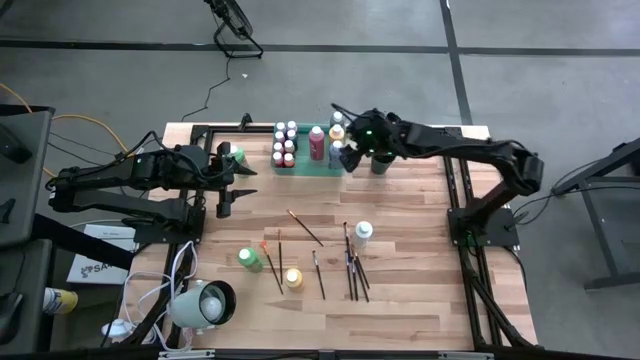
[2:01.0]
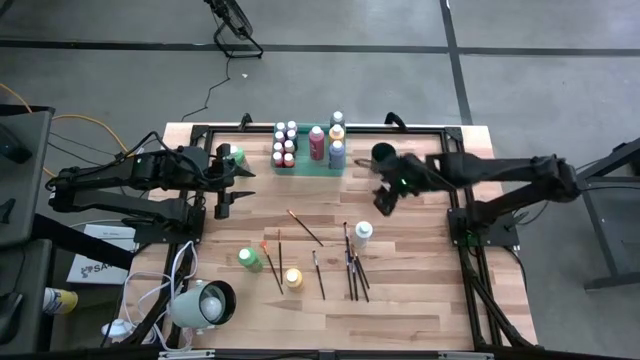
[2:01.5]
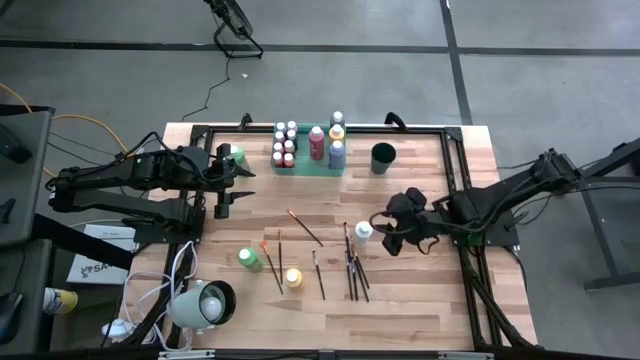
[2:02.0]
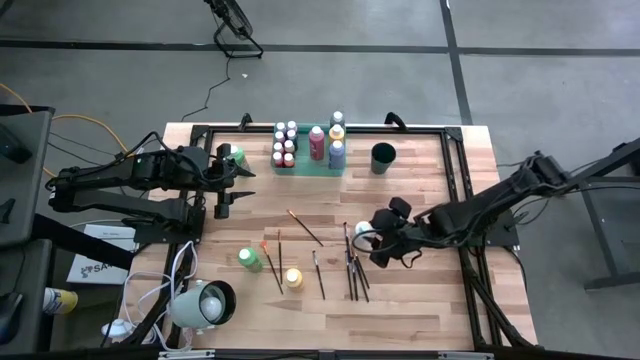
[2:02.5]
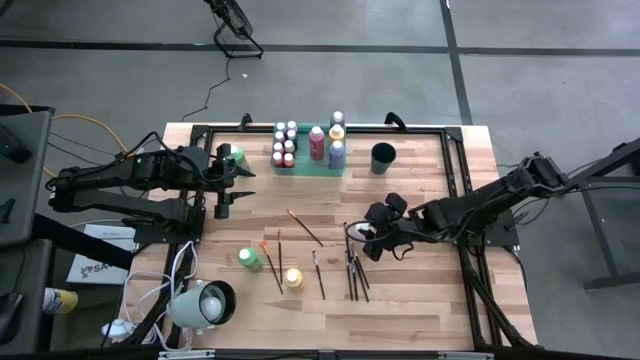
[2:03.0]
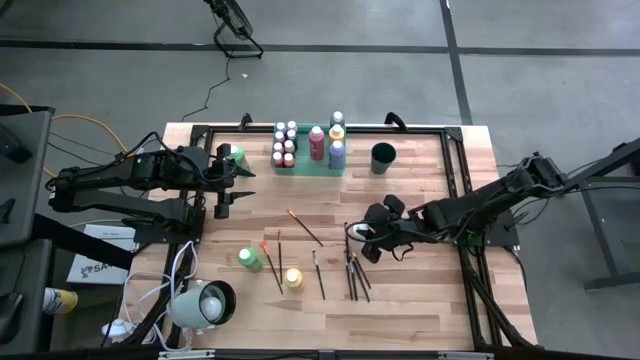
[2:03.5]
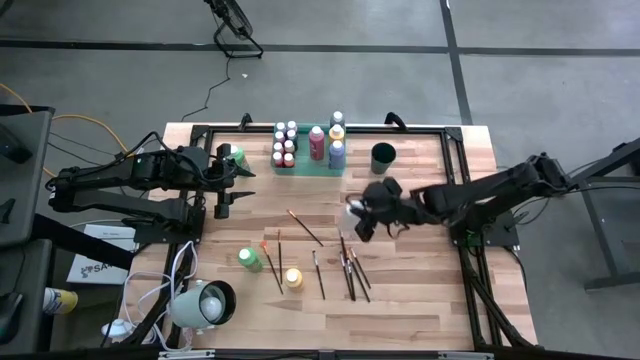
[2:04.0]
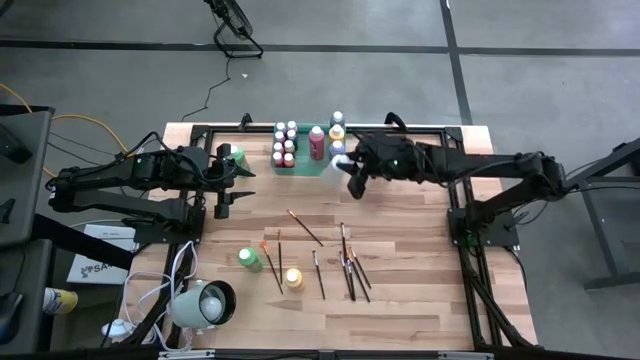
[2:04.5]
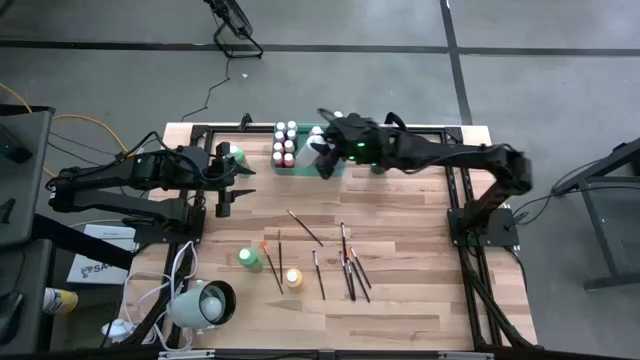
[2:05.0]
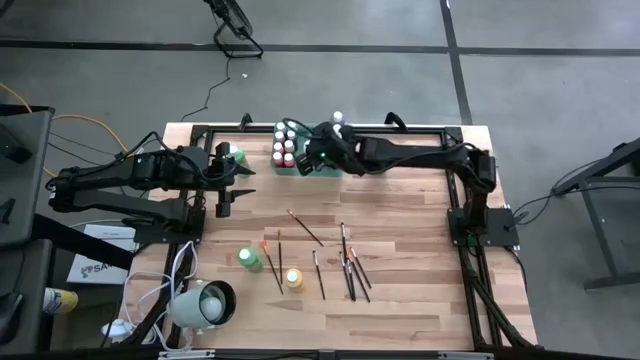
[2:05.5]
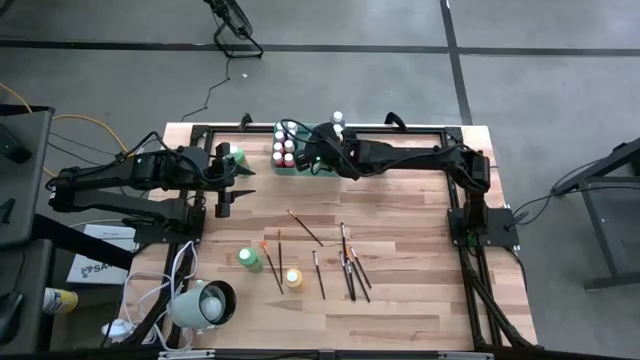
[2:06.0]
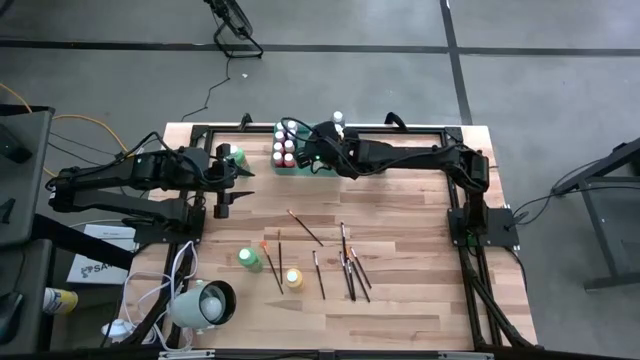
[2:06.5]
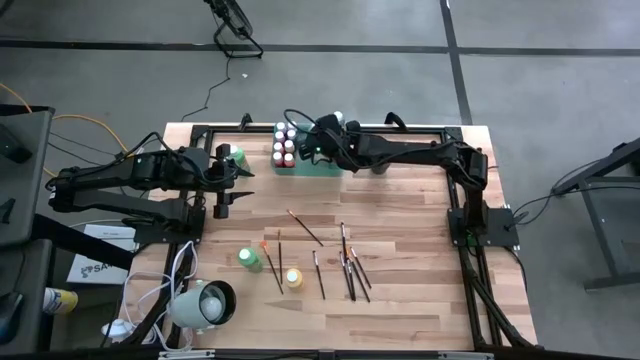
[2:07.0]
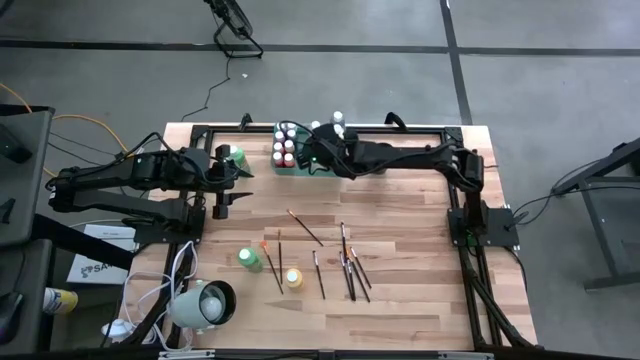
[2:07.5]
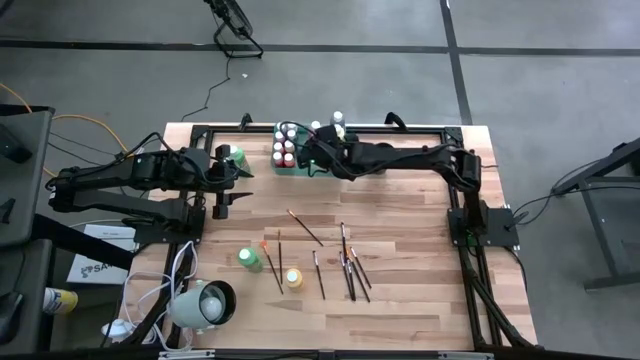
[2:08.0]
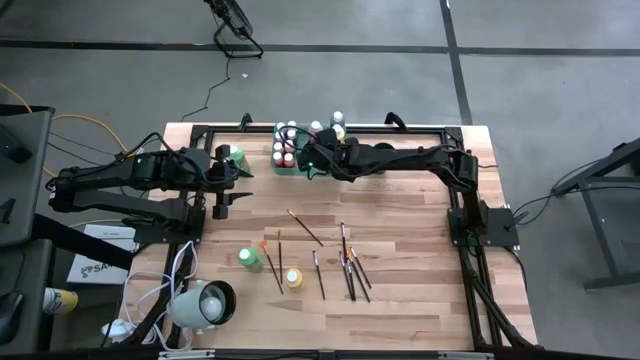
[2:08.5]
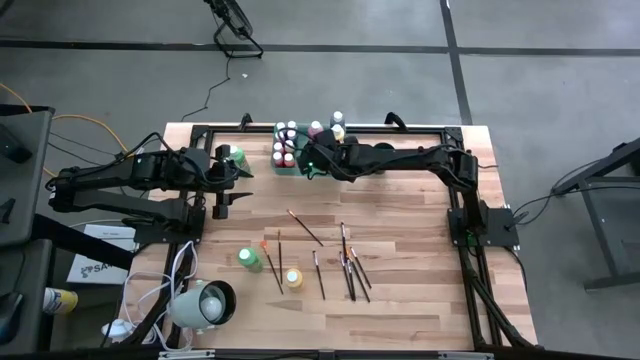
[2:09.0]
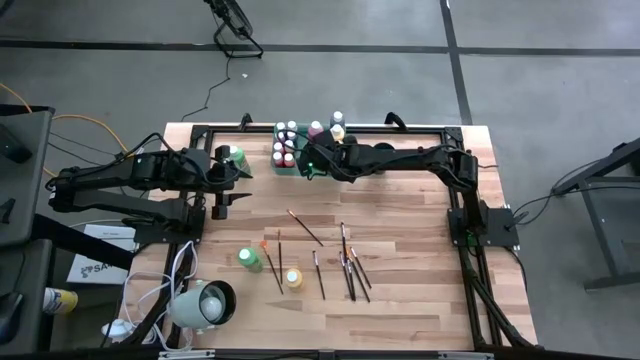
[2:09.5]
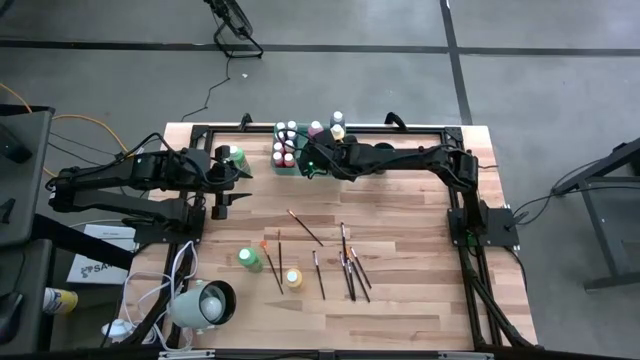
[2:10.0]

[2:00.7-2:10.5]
Task: Pick & Place Paint Supplies
Put the white paint bottle into the green bin

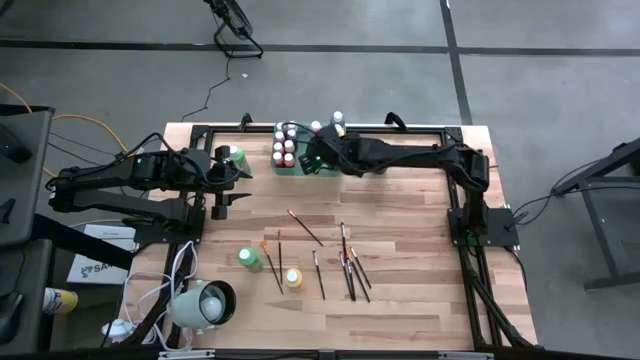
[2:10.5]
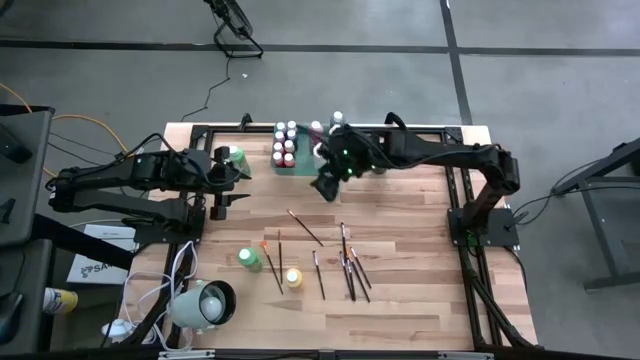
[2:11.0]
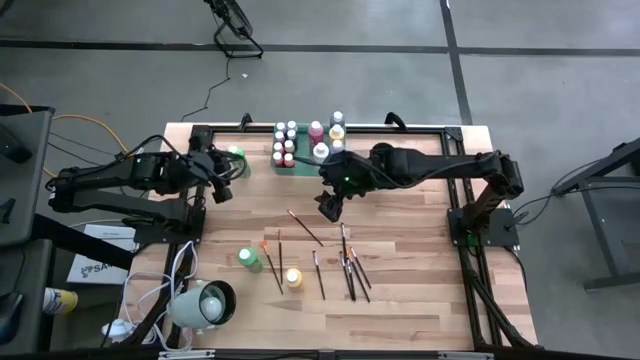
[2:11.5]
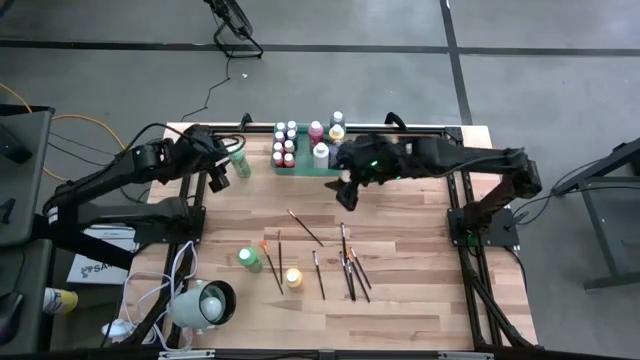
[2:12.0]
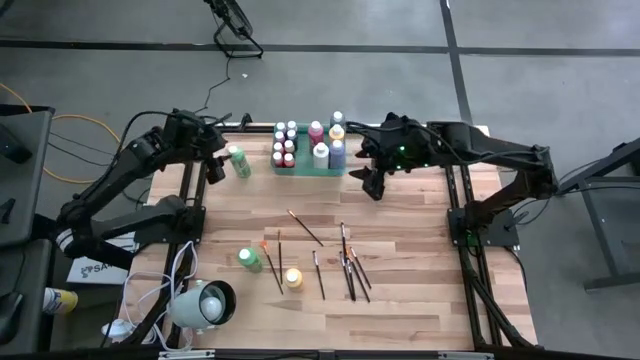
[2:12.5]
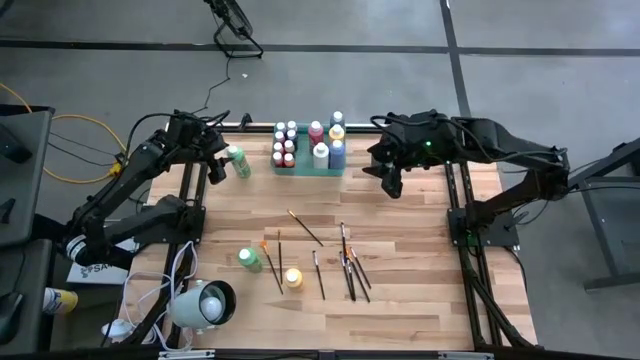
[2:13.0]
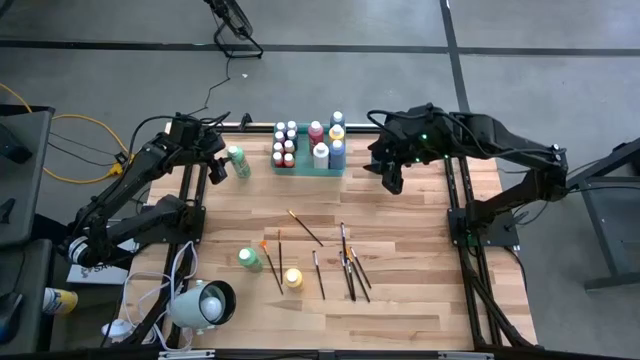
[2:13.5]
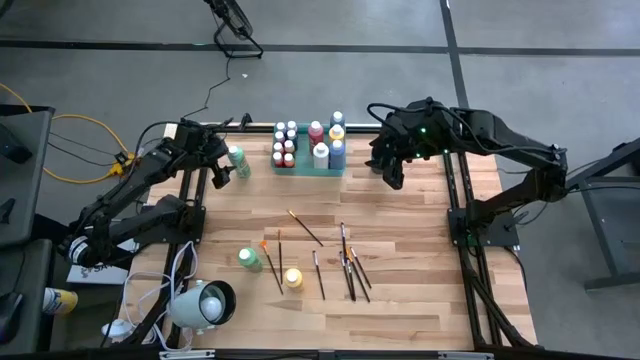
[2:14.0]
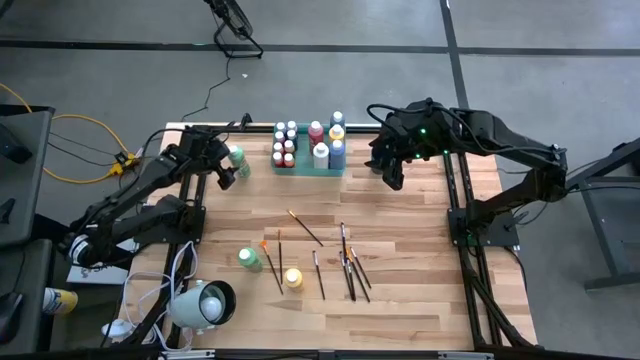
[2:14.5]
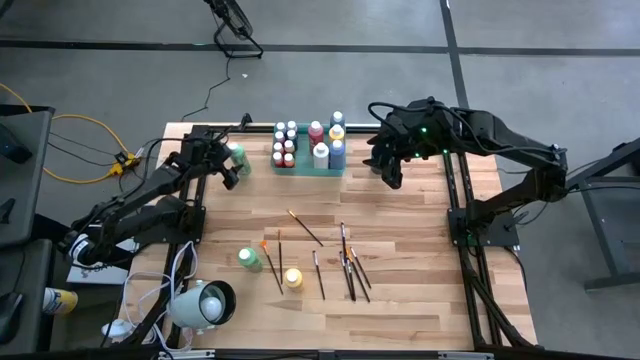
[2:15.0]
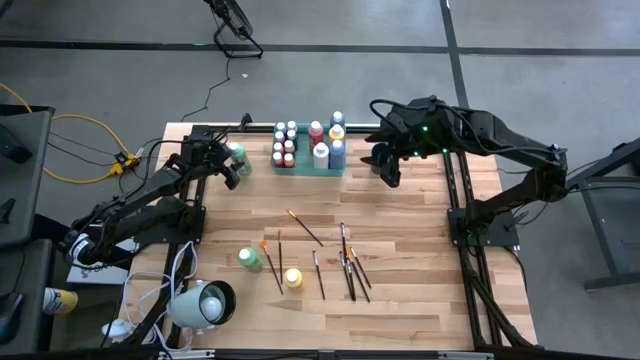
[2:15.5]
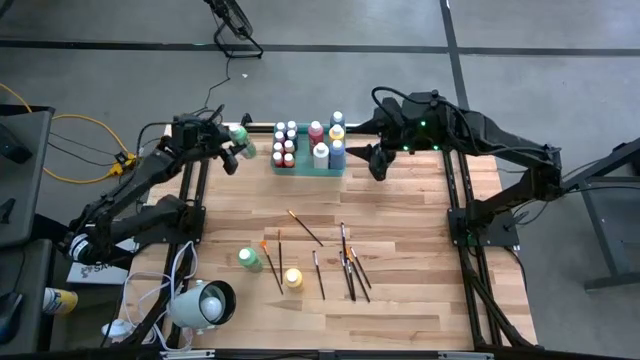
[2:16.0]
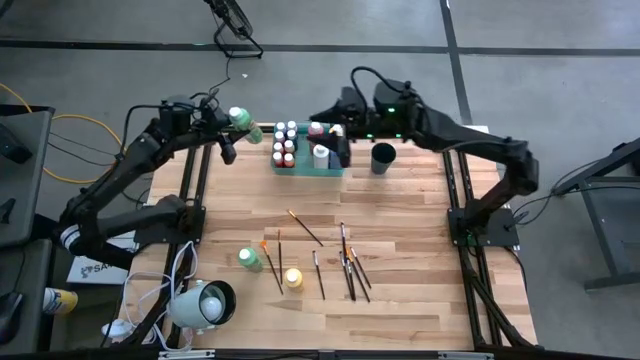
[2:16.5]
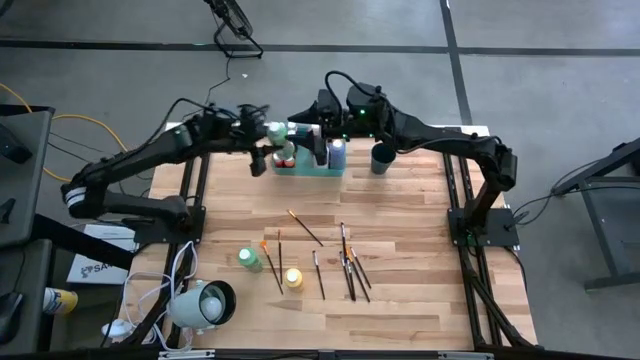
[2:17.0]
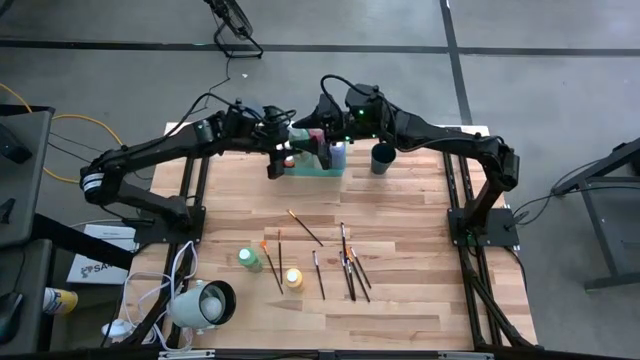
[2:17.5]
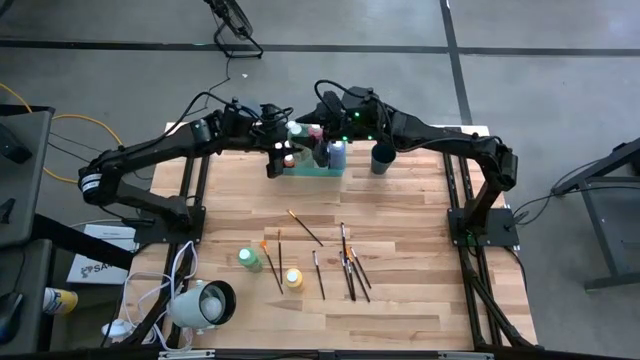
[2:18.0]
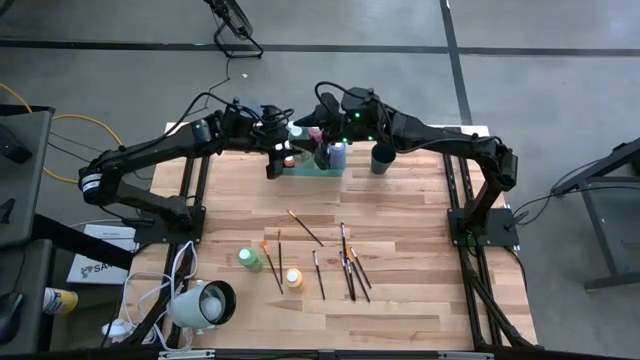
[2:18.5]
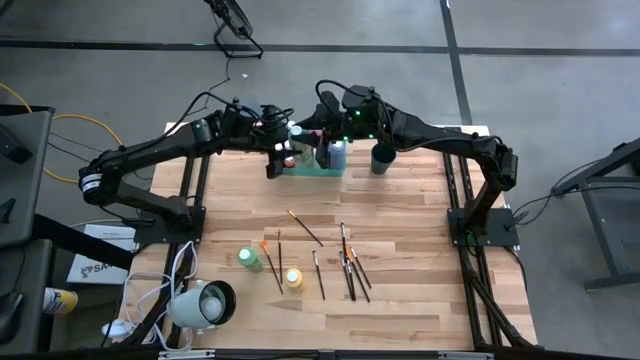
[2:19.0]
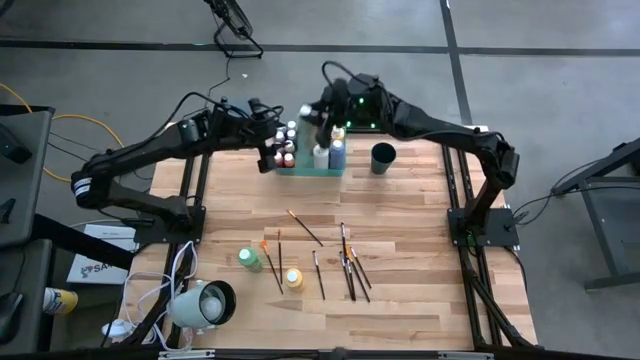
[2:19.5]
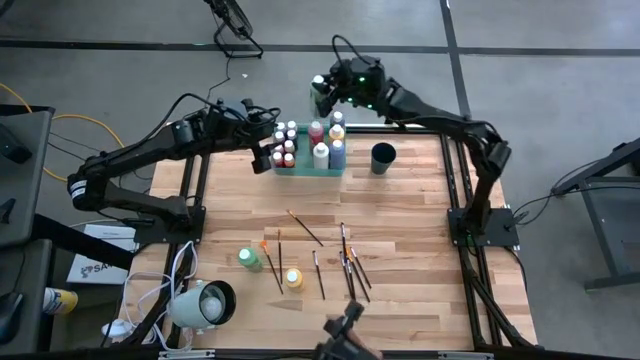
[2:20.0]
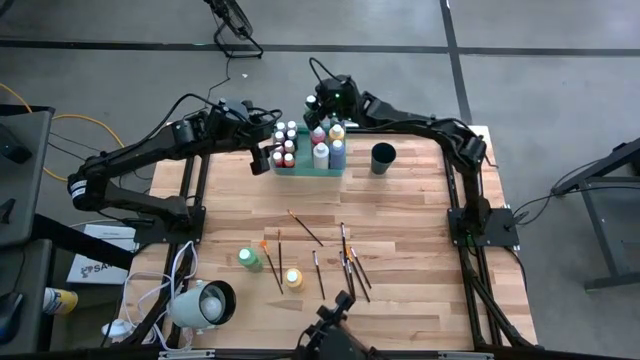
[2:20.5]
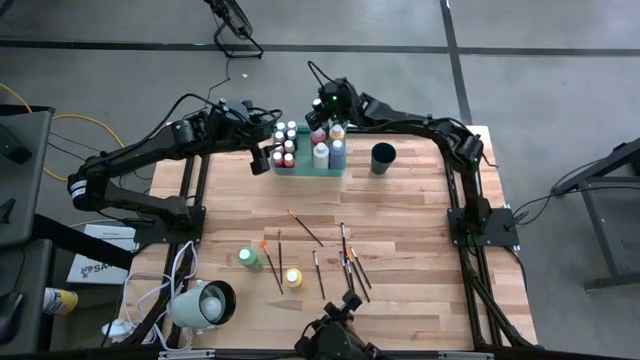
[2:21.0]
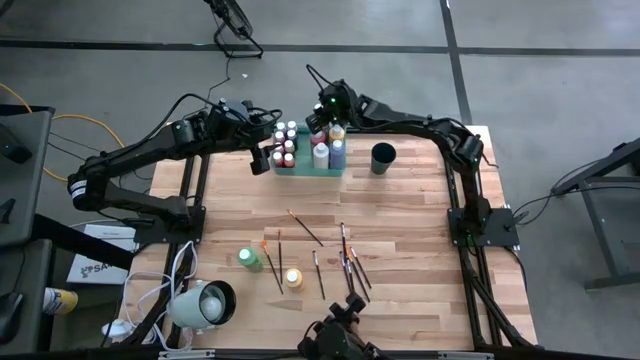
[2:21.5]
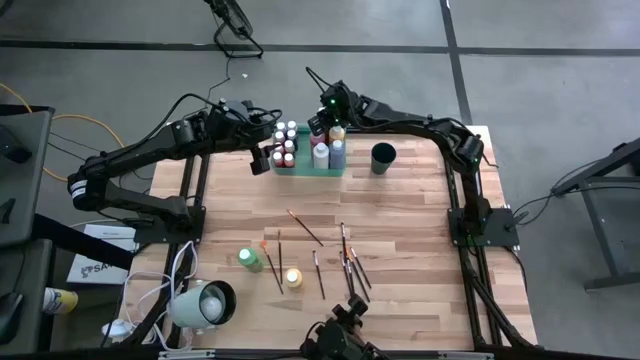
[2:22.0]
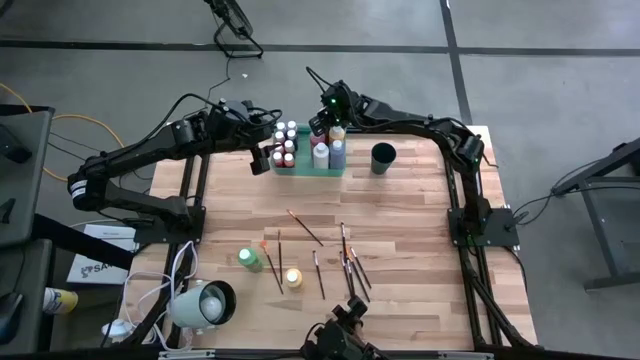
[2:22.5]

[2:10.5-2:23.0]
Put the green paint bottle into the green bin
